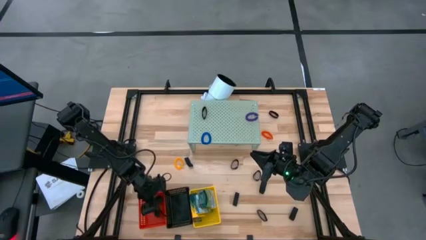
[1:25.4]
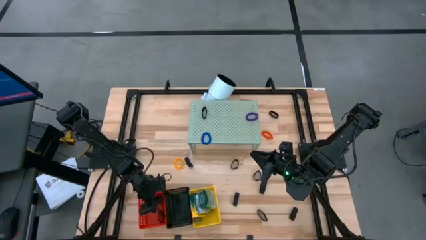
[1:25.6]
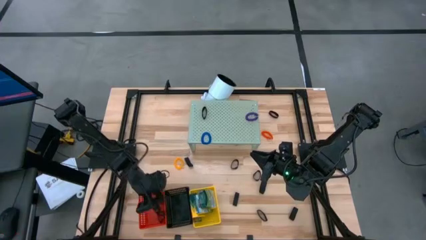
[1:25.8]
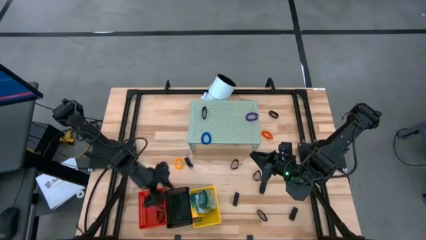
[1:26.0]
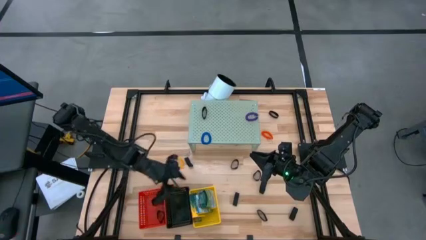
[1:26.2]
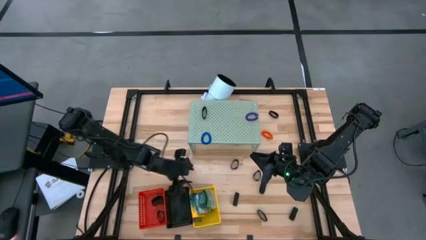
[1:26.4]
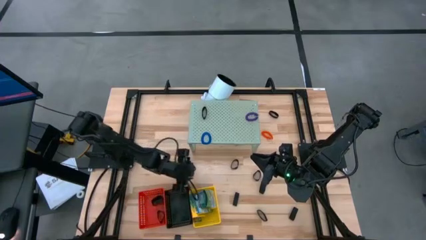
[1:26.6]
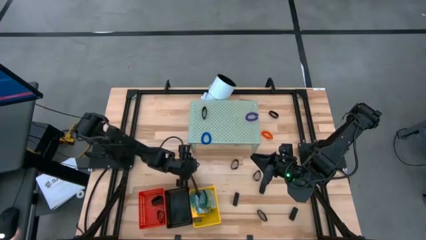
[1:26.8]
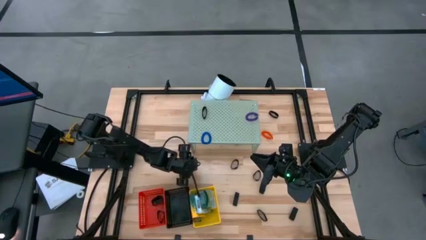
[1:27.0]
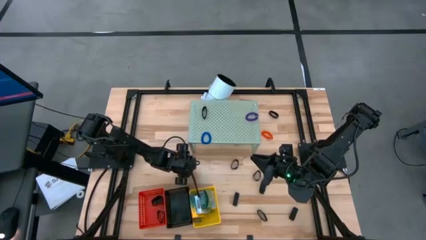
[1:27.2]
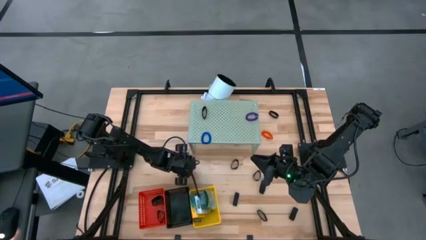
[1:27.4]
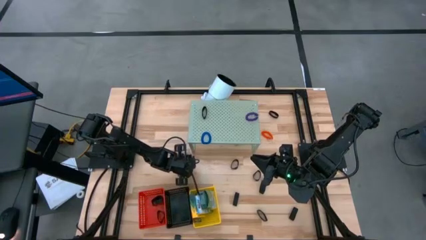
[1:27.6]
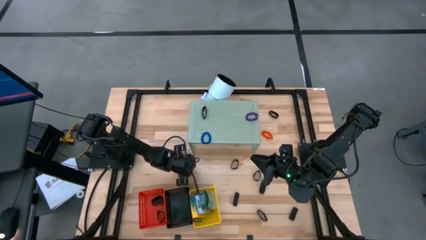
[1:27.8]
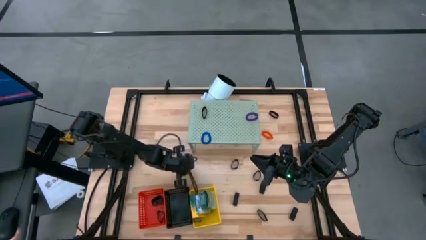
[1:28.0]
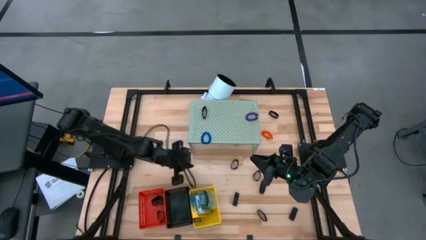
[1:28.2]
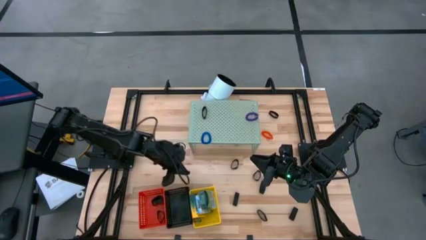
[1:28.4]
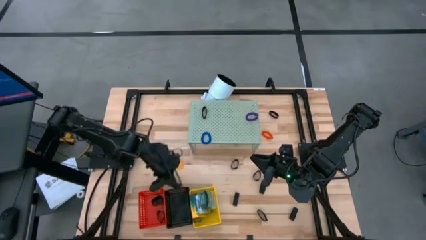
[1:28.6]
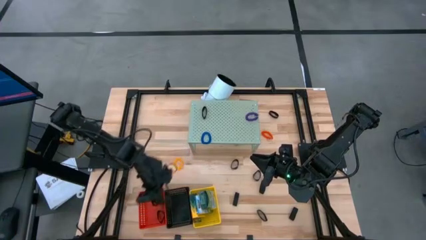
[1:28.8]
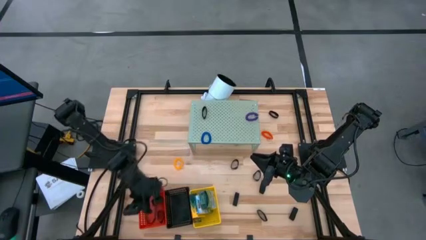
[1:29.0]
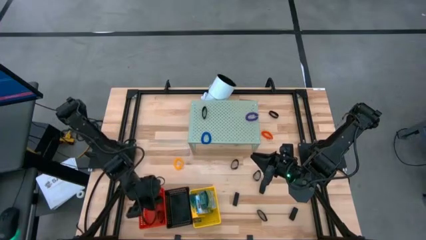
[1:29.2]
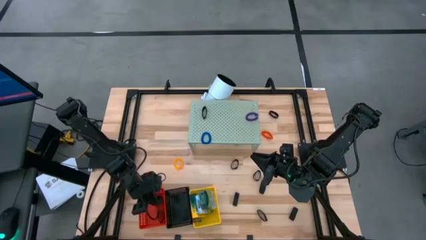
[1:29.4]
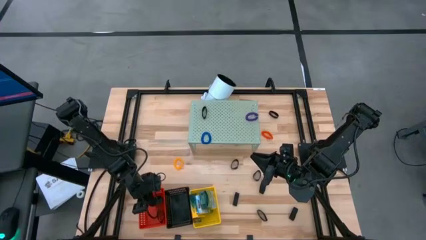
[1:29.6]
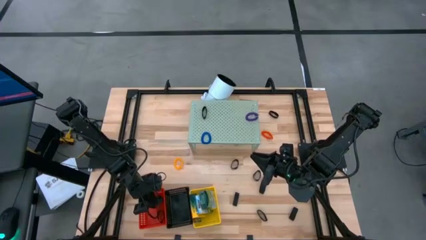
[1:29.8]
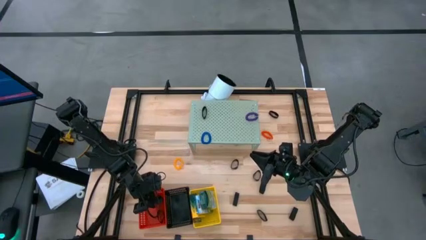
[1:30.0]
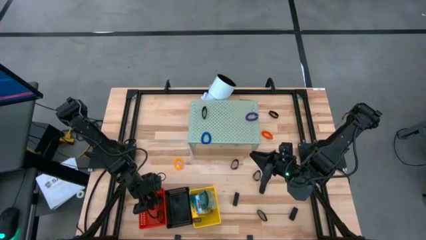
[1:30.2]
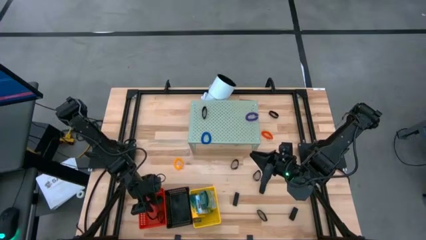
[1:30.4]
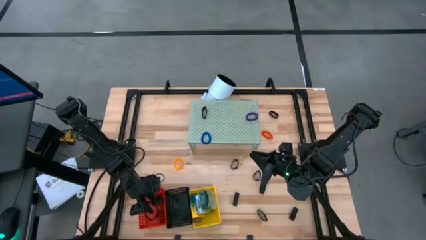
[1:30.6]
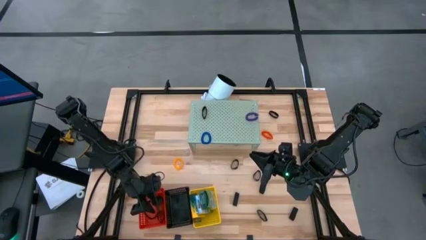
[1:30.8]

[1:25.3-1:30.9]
Task: Pick & Place Office Desk Supplies
Put the black rubber band into the red bin

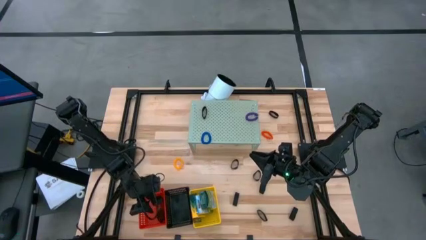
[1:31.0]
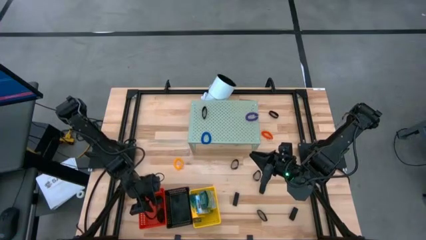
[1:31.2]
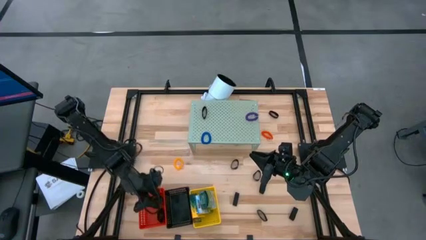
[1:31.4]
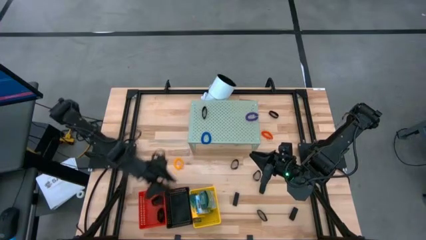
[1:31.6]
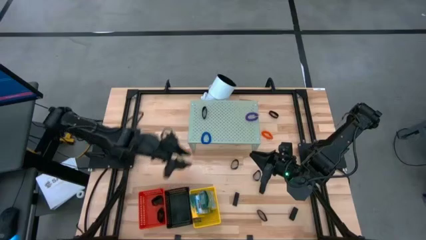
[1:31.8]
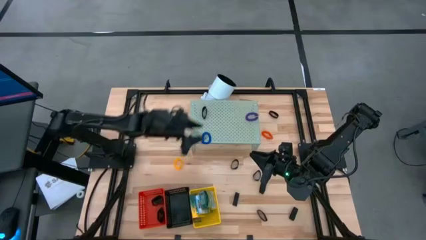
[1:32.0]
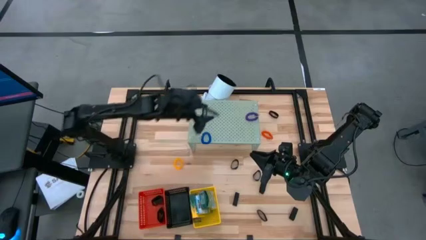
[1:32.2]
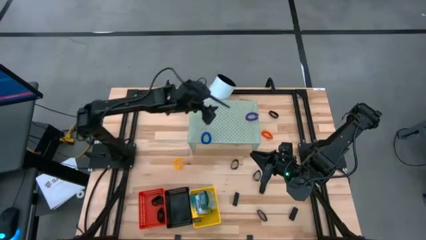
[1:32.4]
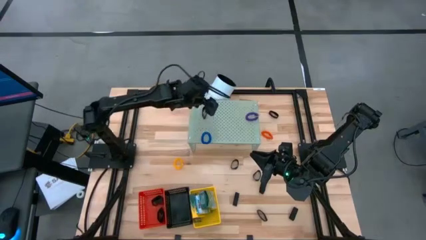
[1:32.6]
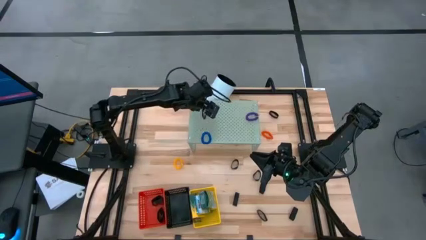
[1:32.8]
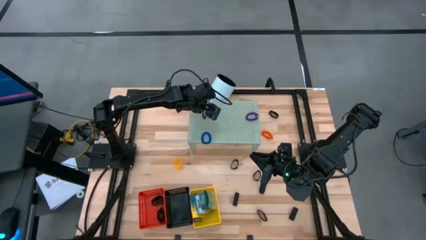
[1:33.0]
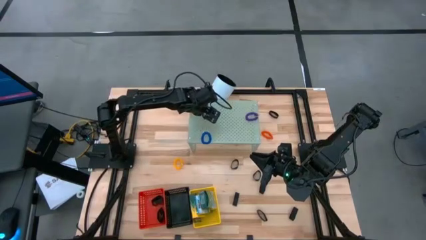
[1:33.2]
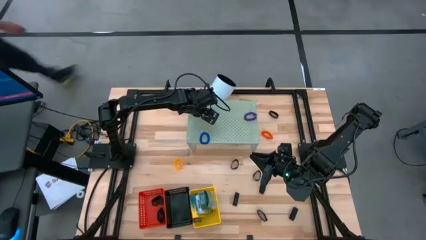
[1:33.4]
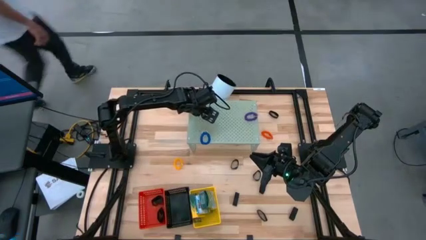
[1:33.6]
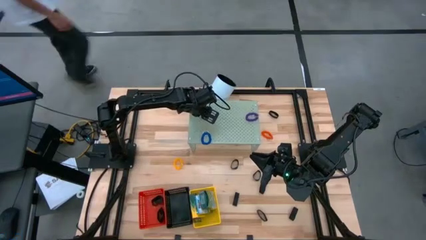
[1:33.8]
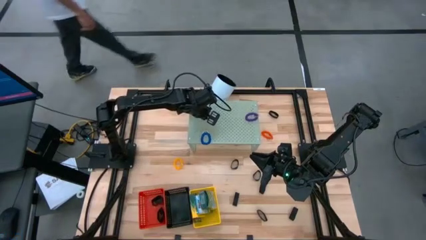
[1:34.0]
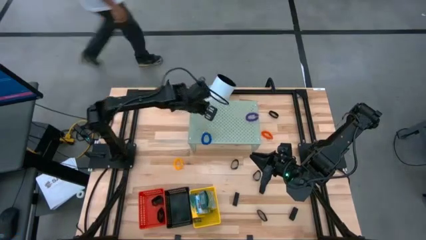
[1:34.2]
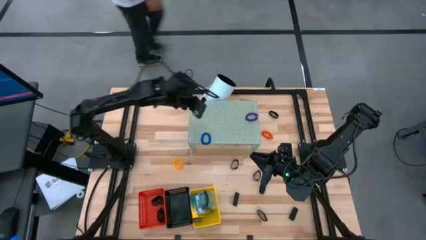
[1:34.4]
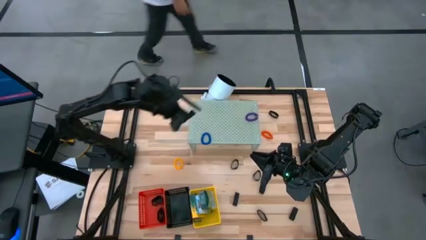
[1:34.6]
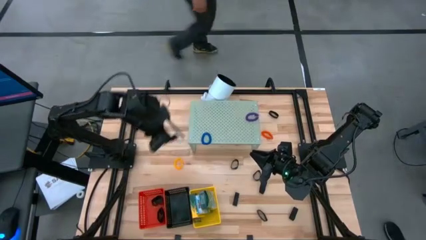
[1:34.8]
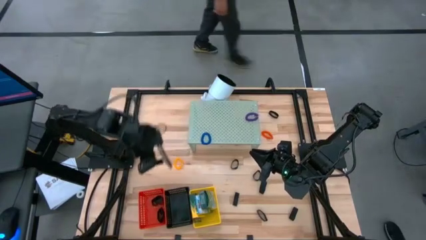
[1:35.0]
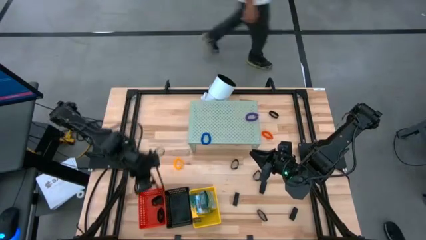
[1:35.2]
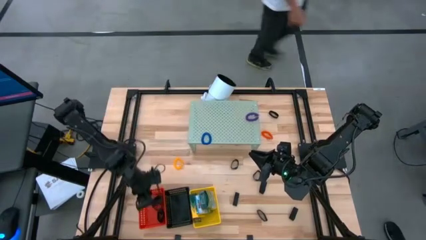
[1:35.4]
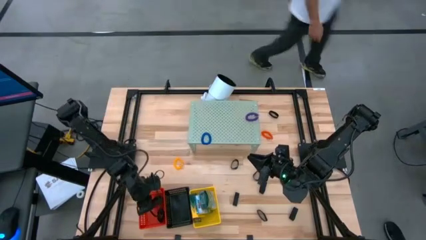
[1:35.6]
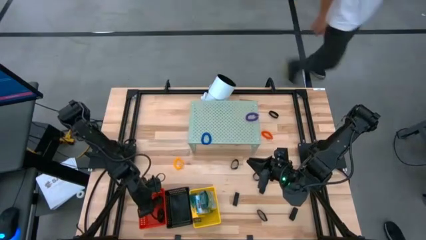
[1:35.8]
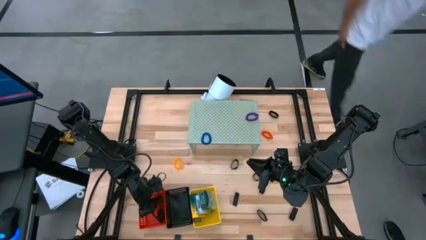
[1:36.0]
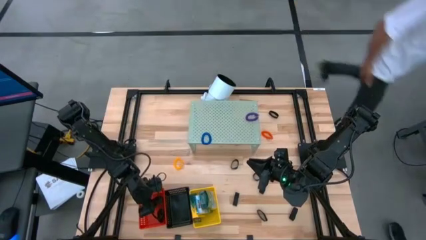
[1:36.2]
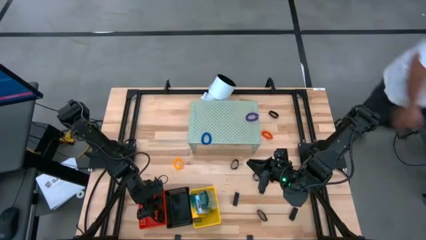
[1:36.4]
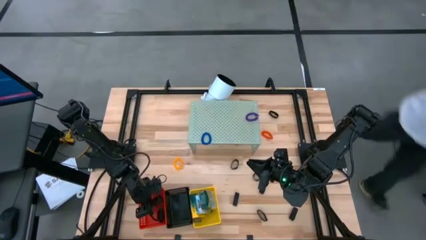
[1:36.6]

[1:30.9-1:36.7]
Put the black rubber band into the red bin

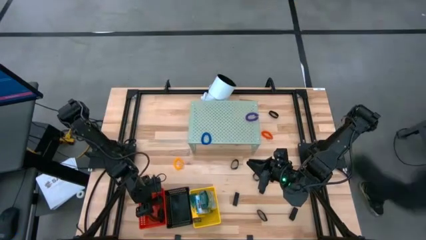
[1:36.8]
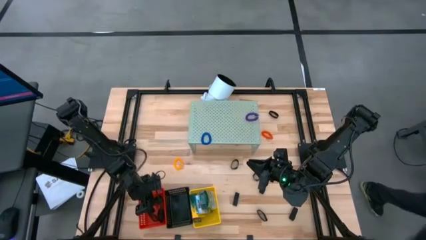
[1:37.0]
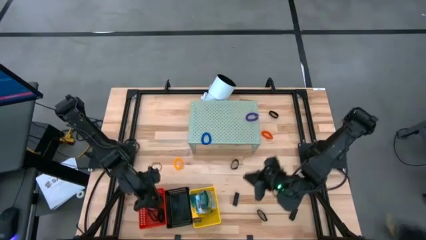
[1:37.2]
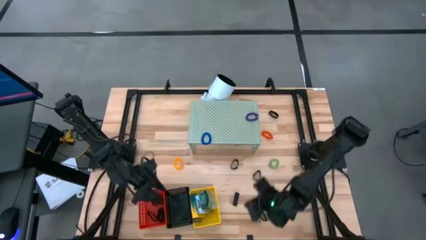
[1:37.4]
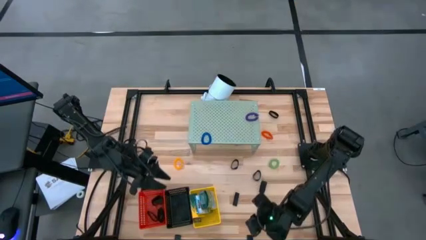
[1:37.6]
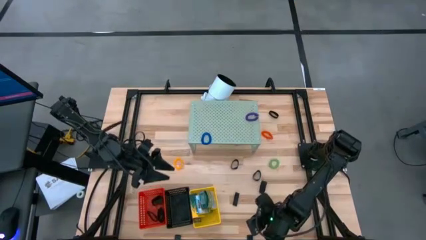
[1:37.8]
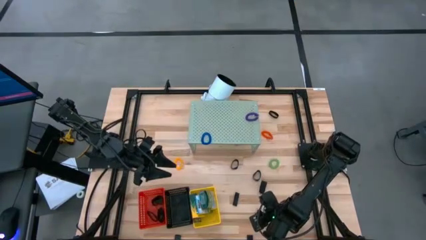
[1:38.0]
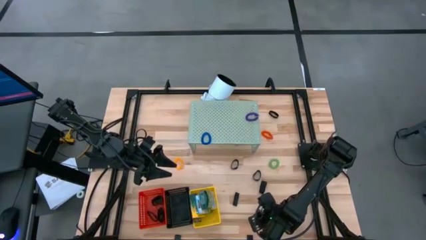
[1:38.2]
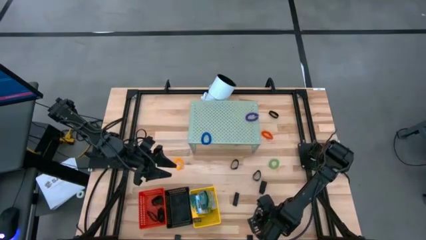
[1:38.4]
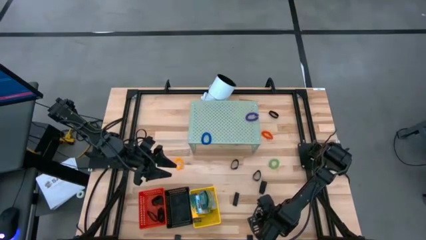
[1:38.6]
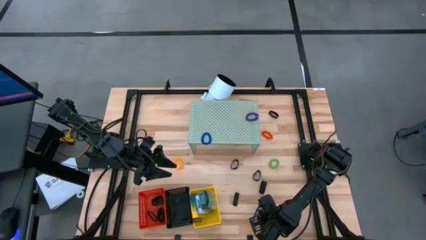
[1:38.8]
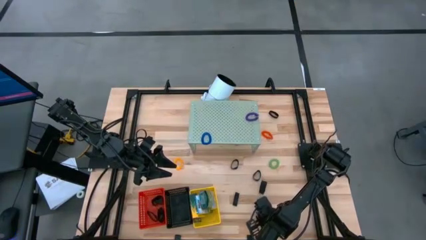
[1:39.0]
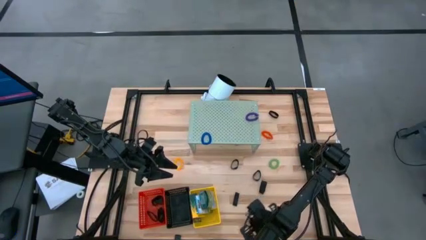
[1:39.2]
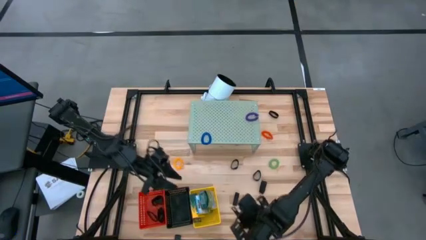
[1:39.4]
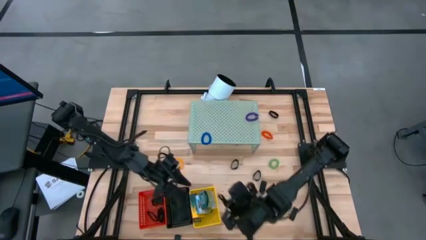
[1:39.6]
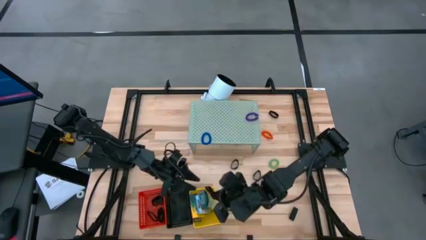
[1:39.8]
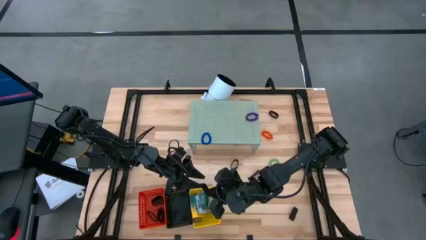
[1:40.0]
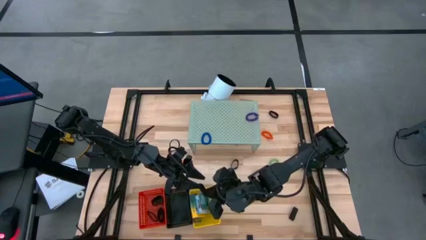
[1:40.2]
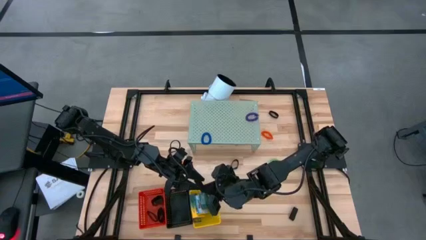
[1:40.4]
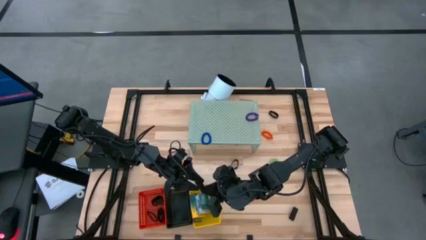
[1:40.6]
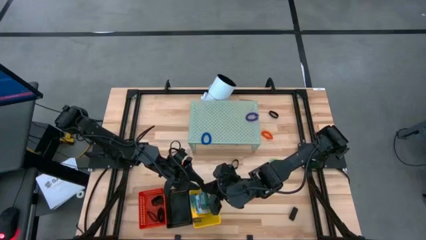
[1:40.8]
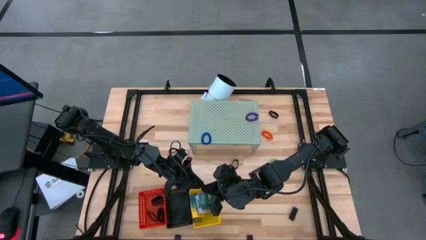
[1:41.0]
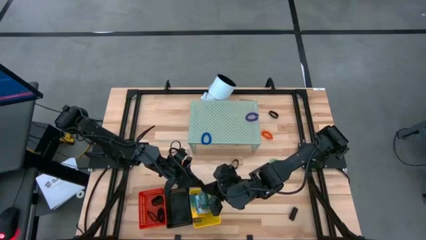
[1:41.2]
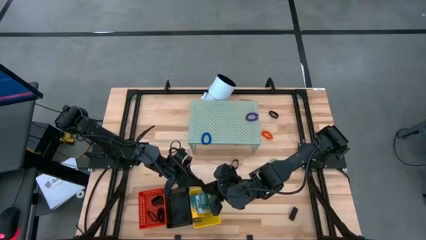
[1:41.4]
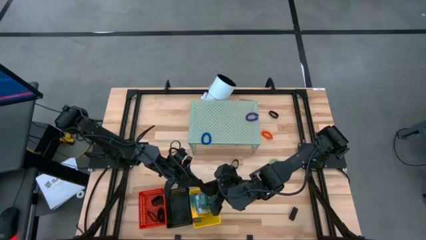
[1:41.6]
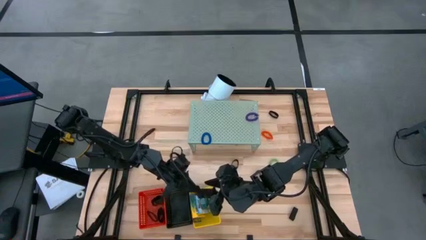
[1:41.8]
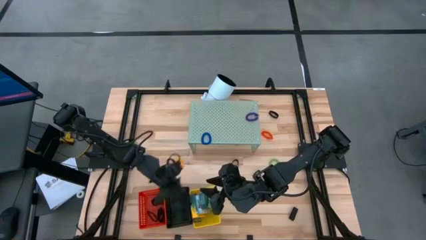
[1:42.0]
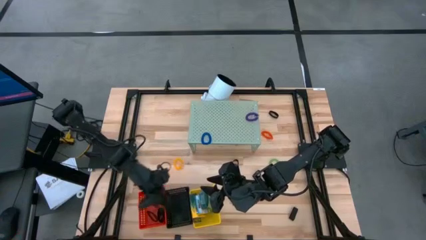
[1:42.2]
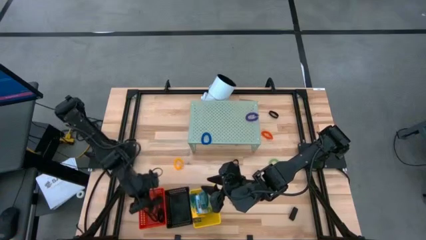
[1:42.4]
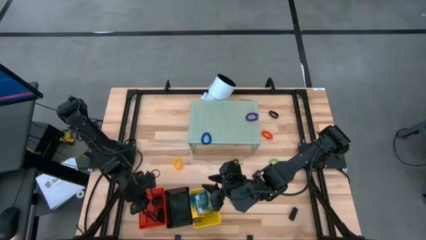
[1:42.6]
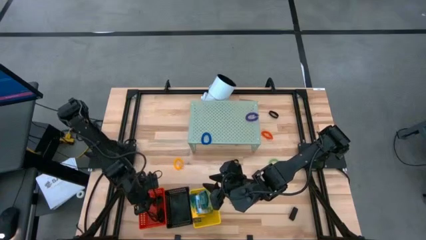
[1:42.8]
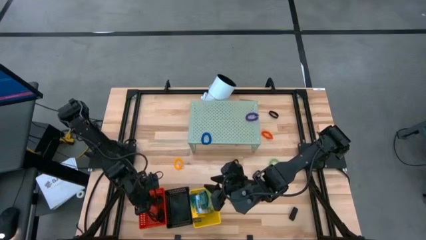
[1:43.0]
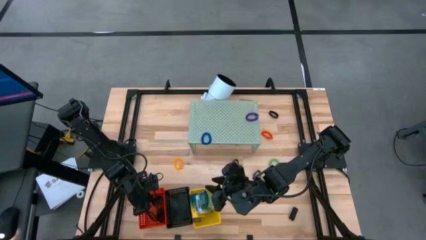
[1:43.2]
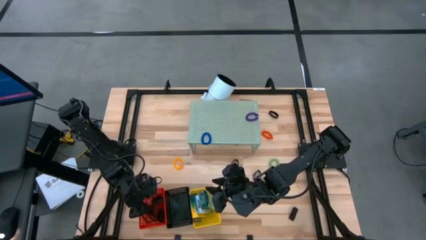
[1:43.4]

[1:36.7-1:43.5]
Put the black rubber band into the red bin
